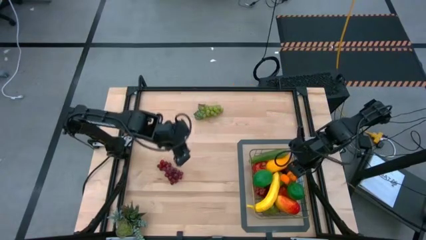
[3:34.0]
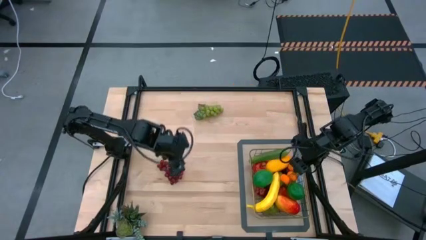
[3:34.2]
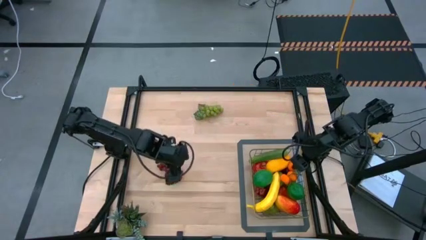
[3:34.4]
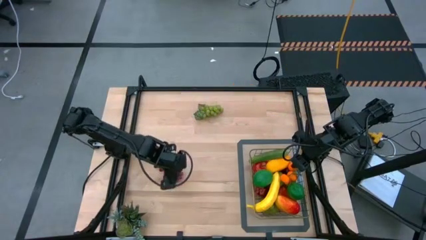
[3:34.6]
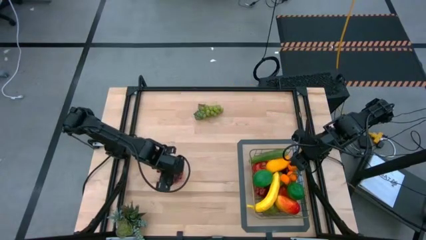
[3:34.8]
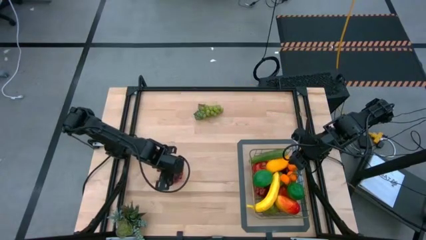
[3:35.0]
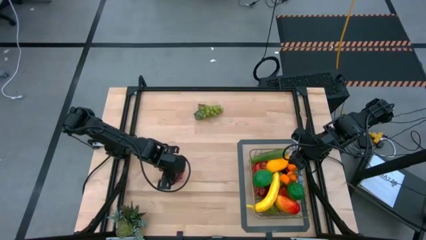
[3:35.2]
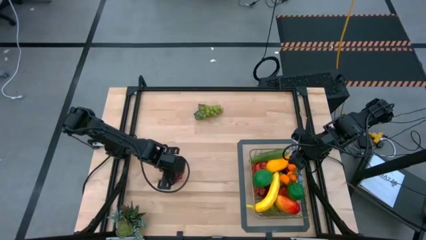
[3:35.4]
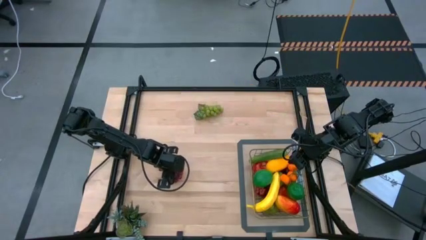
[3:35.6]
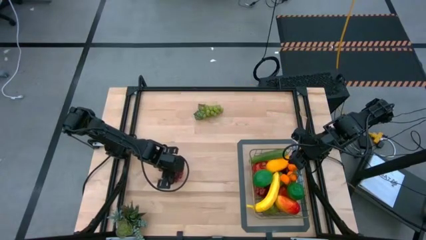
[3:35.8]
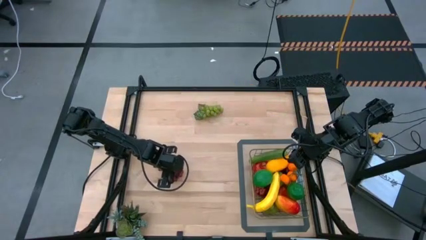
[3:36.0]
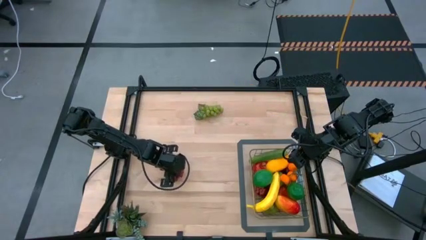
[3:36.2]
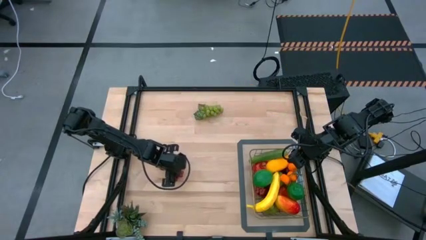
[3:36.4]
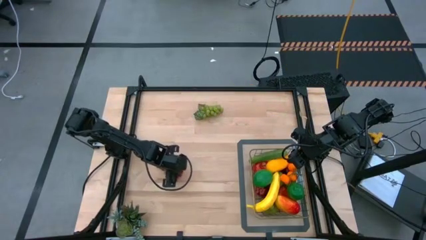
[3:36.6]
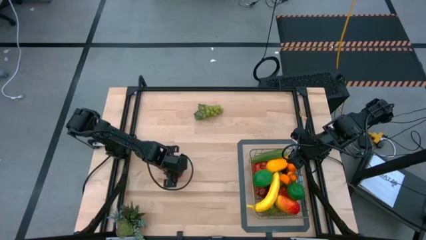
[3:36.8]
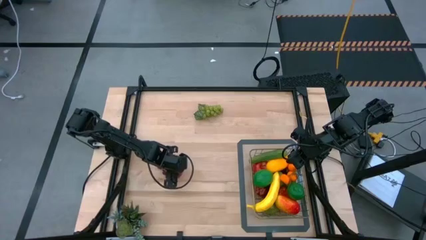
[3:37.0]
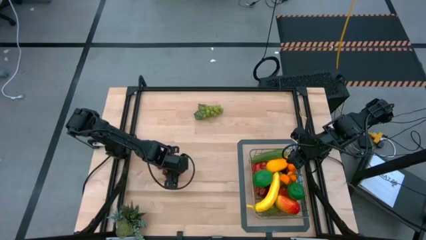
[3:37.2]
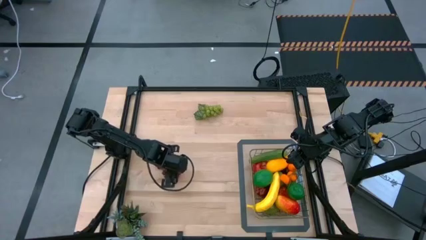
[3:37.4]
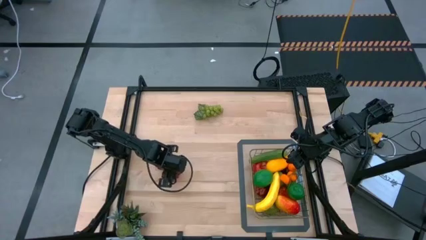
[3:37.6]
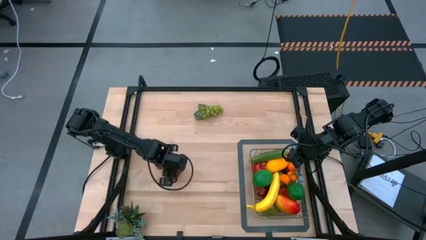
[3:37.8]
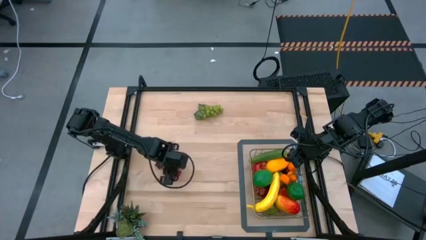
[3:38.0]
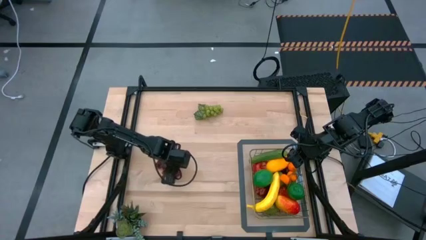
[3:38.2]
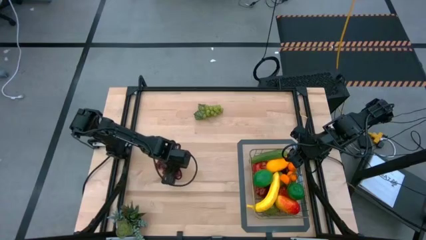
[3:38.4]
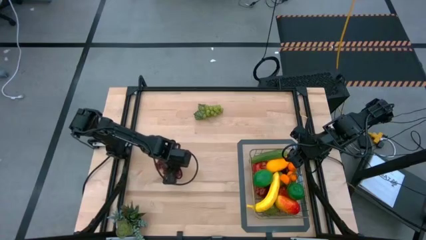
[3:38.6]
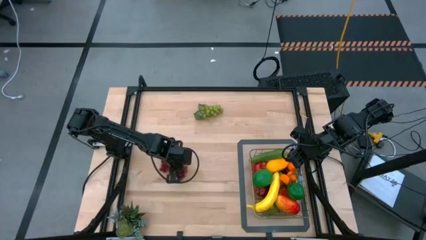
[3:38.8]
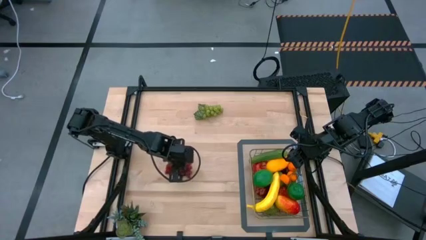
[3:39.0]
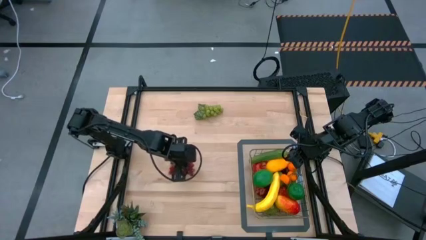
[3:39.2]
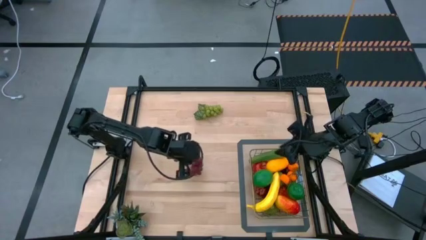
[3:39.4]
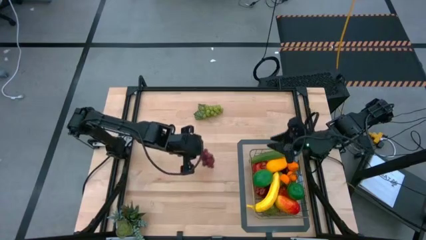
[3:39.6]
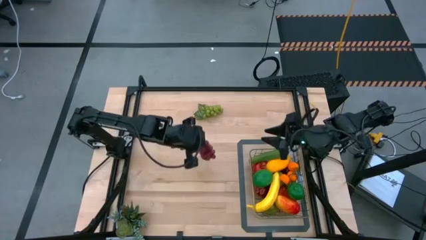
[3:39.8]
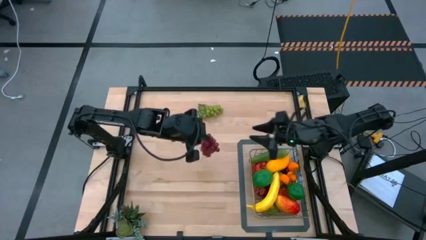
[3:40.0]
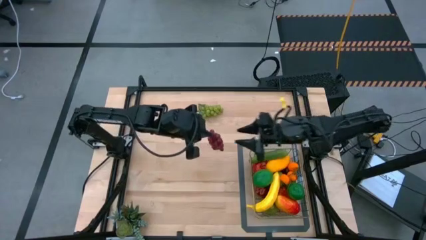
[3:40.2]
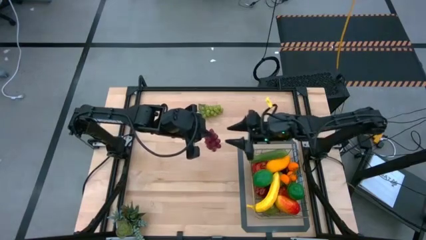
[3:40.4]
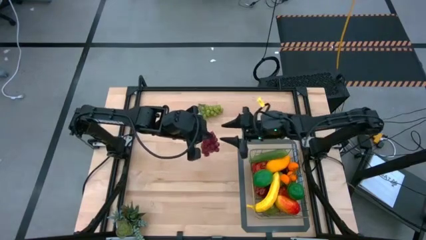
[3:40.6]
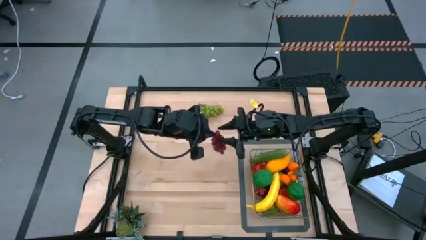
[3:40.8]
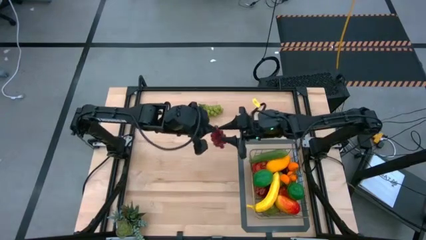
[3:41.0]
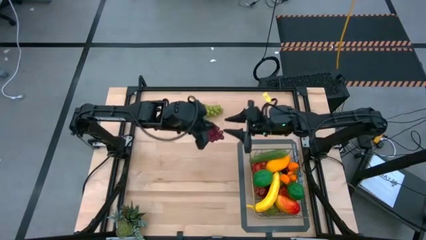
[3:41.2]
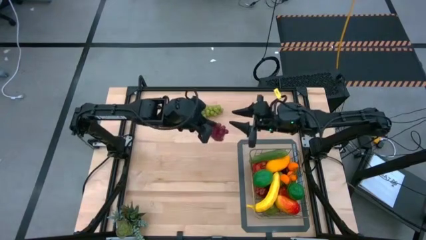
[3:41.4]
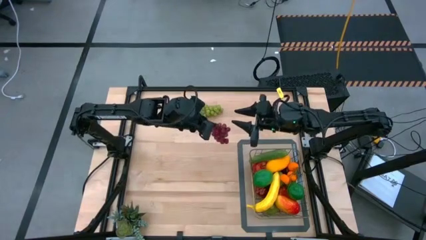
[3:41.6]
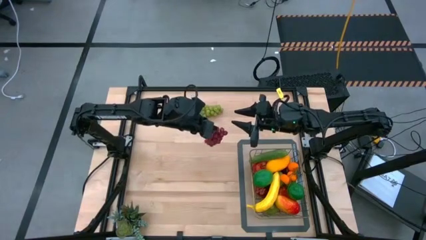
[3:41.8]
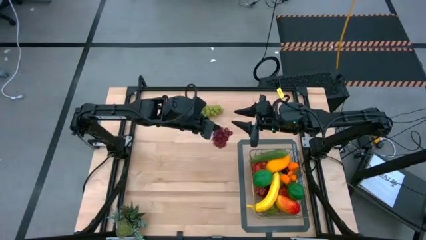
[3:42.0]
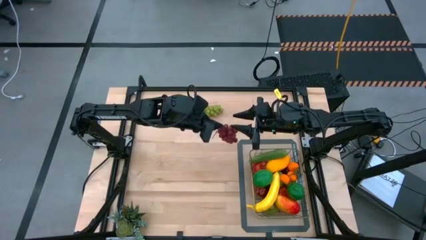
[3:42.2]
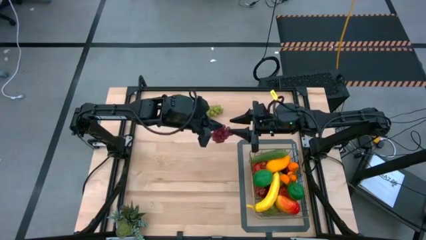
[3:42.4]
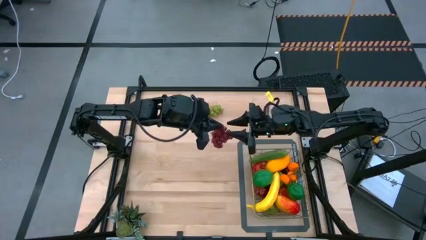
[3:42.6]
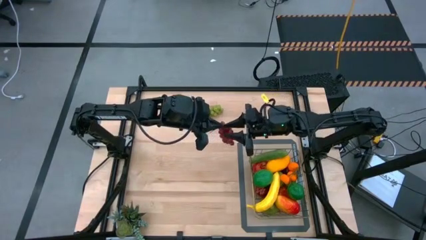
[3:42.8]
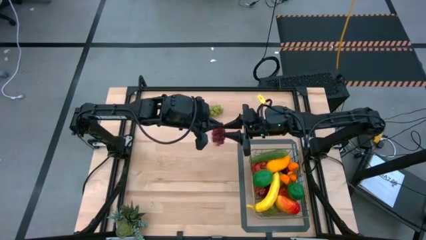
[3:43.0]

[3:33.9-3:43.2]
Task: Build produce basket
Put the red grapes into the wire basket

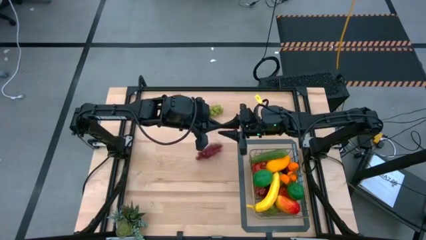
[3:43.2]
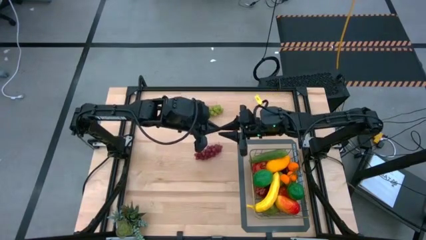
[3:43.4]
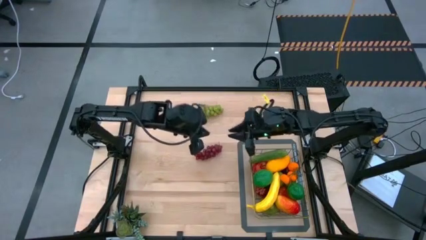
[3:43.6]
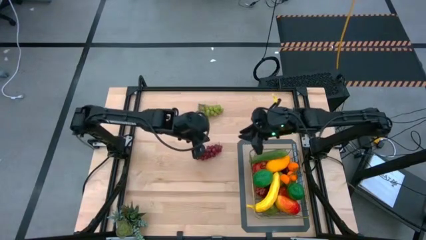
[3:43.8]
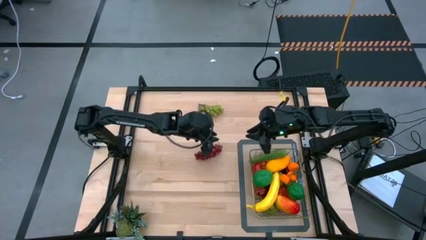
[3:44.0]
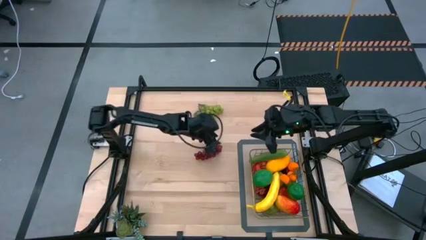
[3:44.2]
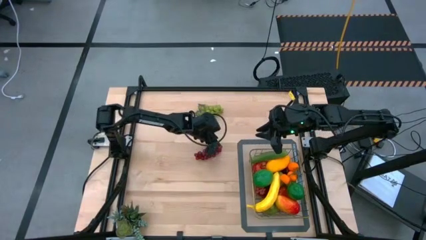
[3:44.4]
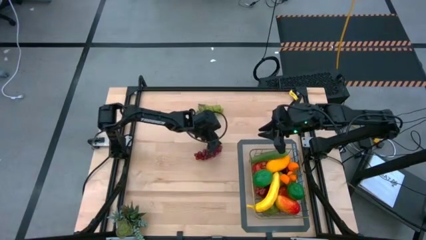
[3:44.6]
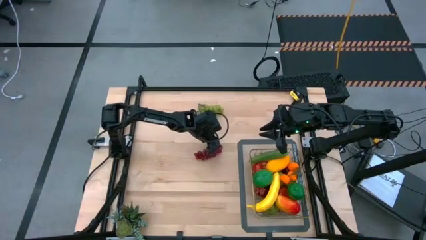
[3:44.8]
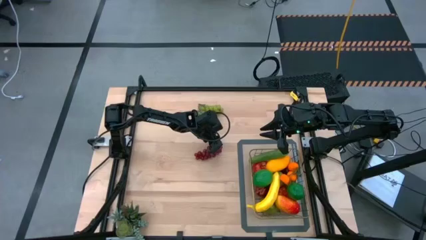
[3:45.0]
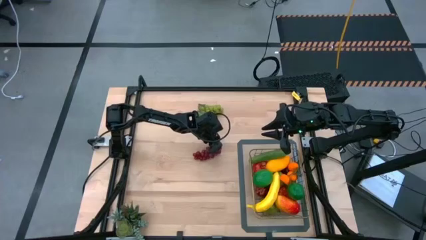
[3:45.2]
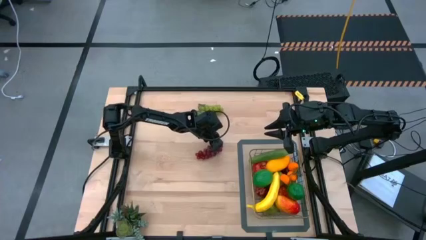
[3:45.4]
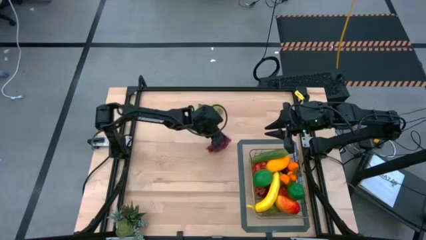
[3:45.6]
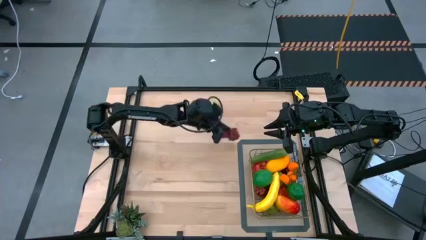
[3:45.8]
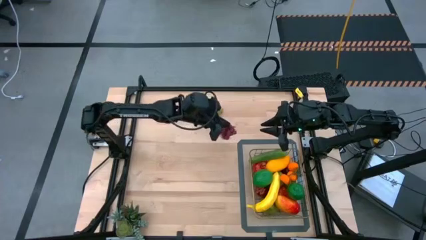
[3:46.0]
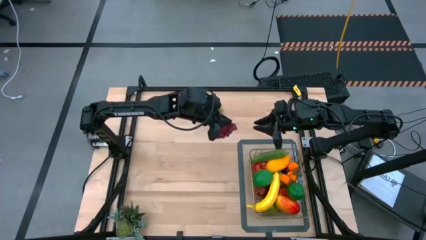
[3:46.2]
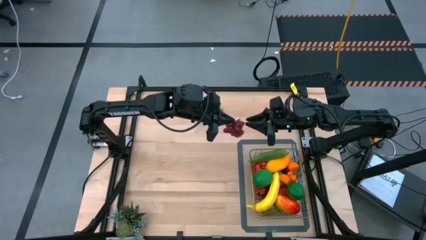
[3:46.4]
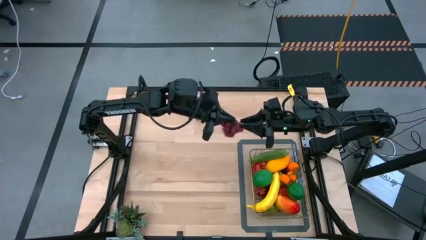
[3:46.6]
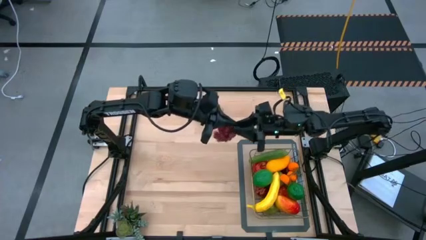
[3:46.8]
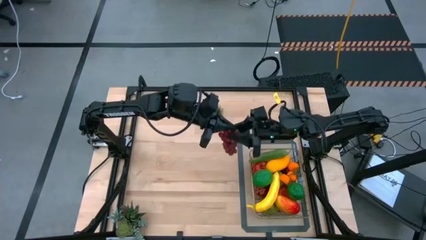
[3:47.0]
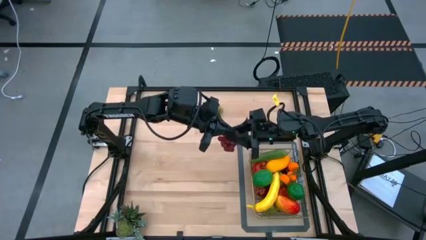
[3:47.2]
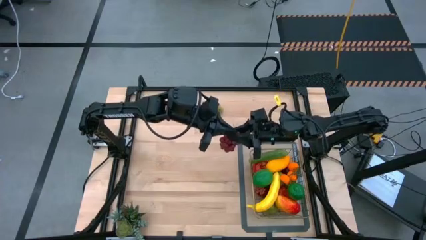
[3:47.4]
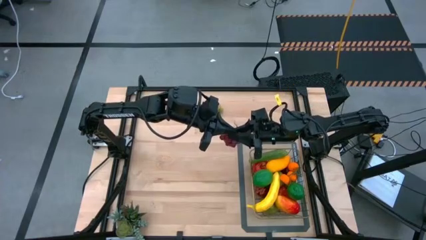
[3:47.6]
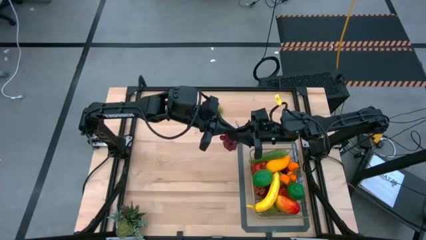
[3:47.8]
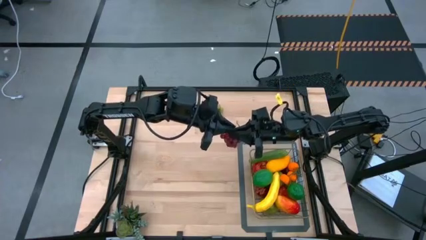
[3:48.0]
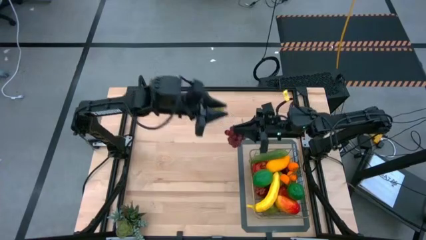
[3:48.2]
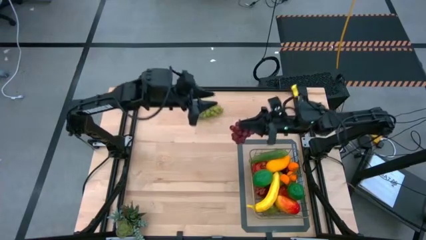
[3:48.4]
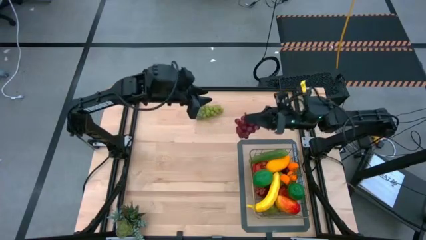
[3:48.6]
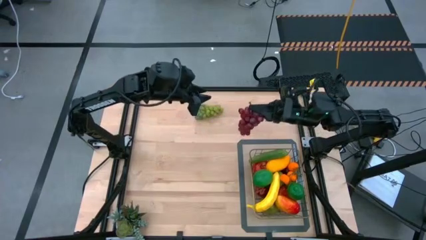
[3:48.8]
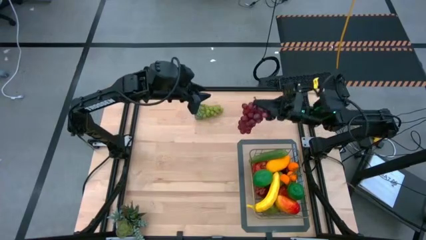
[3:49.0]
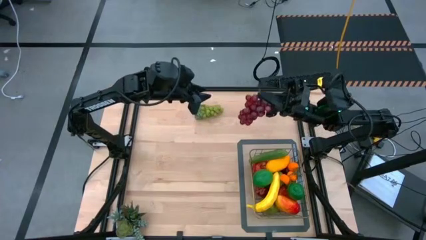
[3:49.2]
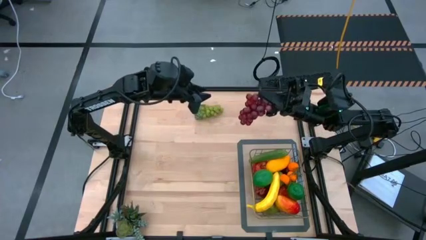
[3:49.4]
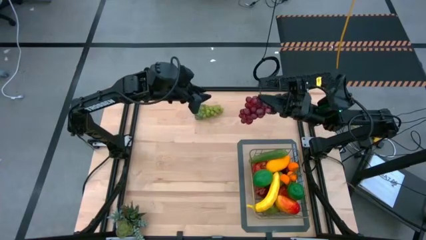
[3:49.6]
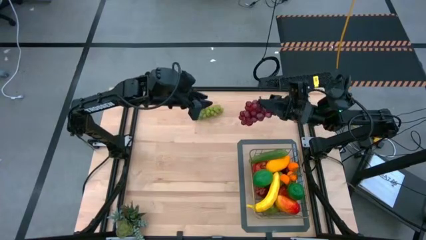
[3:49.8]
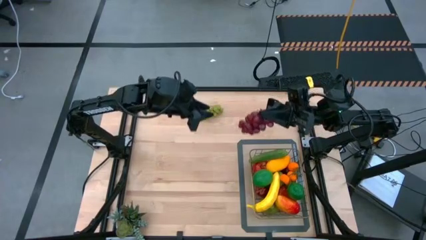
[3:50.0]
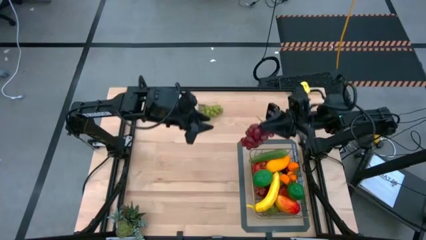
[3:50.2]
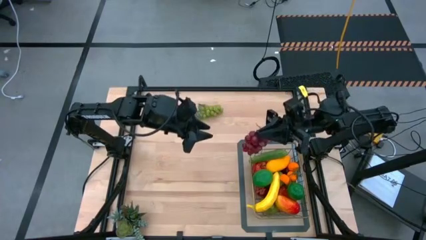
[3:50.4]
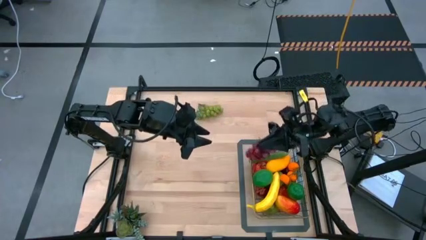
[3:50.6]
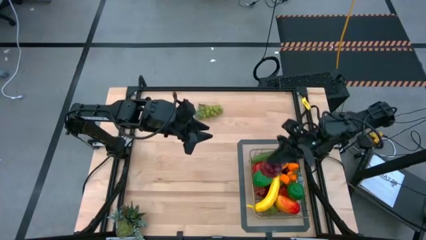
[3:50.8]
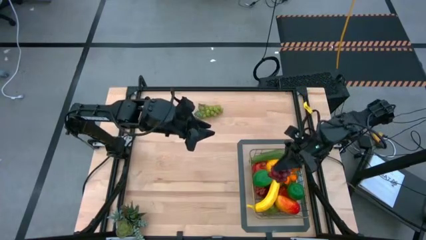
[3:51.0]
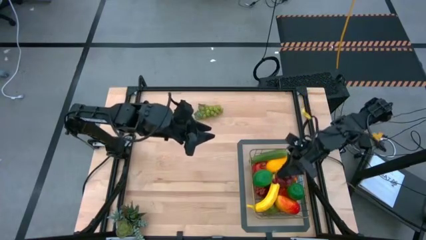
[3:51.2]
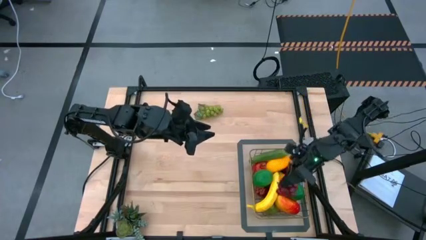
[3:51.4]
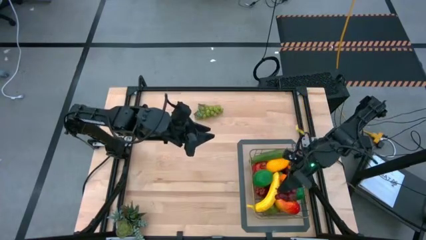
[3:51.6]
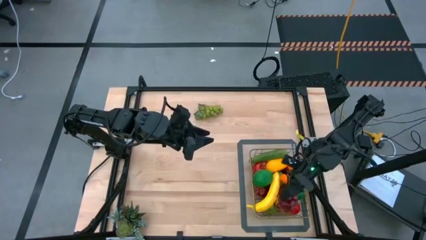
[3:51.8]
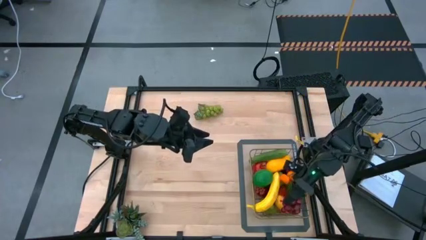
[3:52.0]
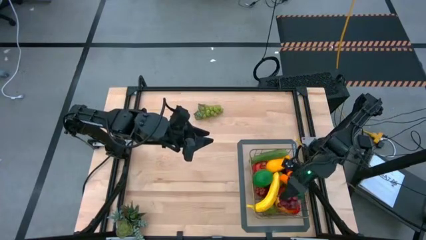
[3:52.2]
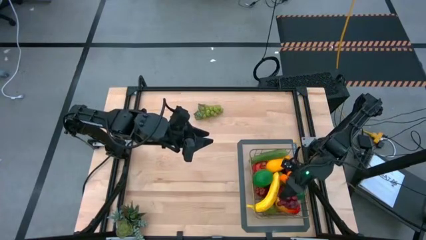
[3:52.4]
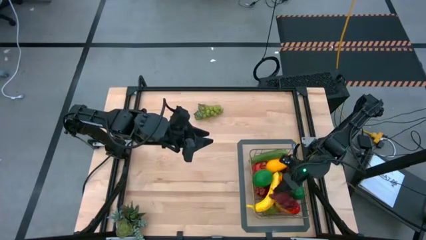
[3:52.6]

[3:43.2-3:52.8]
Put the red grapes into the wire basket
